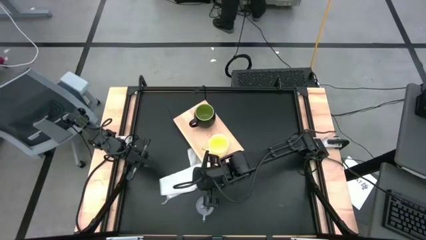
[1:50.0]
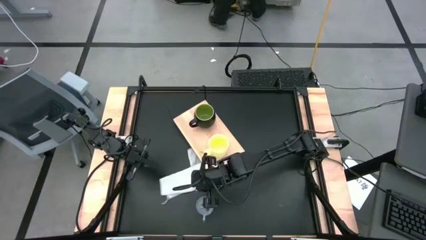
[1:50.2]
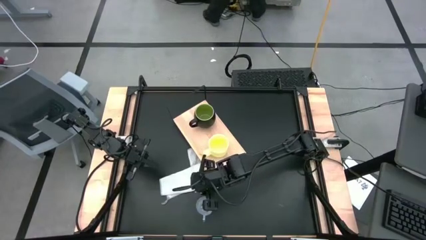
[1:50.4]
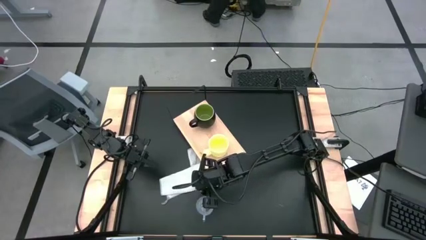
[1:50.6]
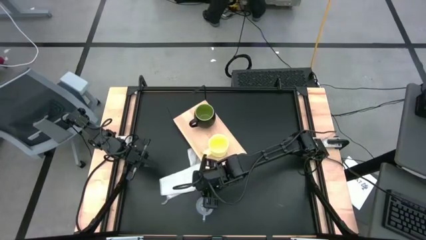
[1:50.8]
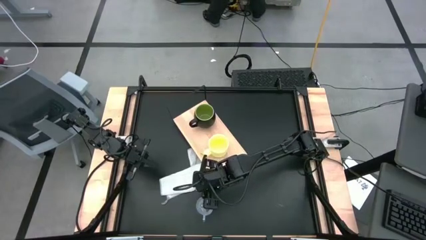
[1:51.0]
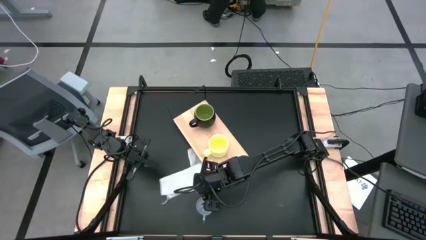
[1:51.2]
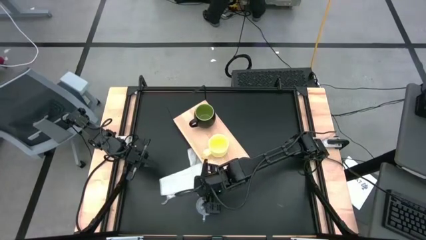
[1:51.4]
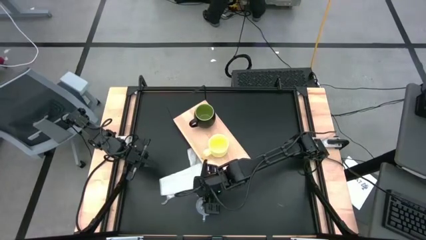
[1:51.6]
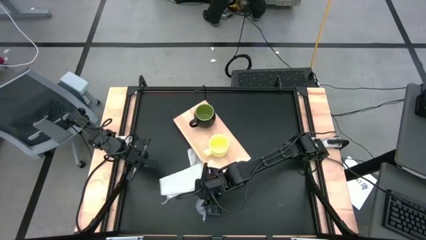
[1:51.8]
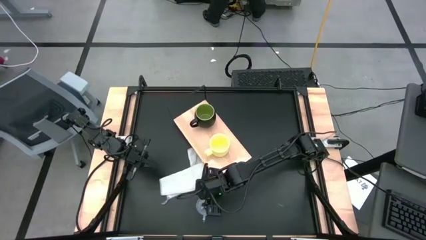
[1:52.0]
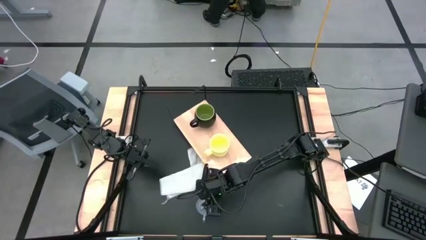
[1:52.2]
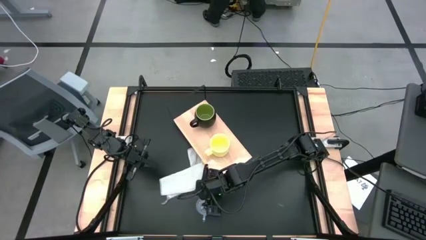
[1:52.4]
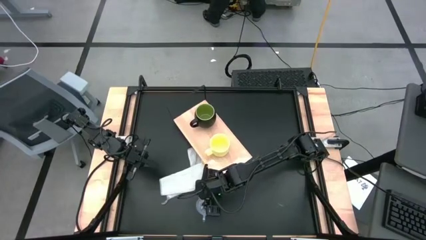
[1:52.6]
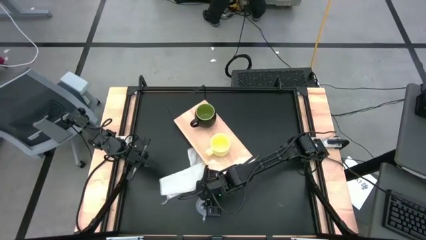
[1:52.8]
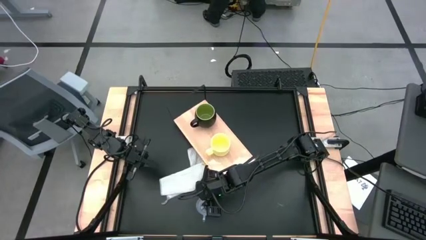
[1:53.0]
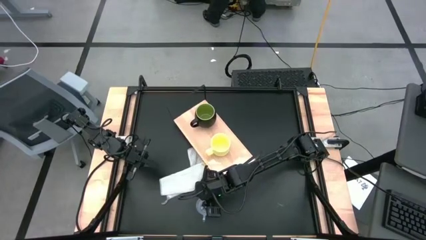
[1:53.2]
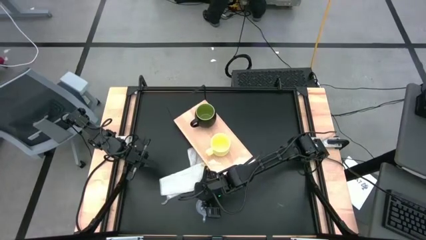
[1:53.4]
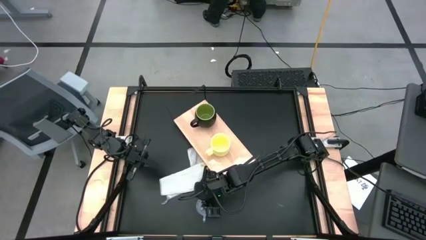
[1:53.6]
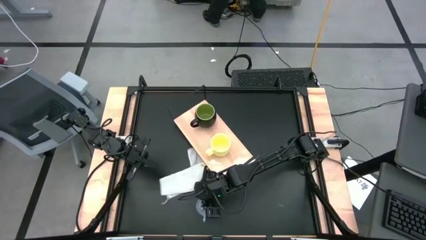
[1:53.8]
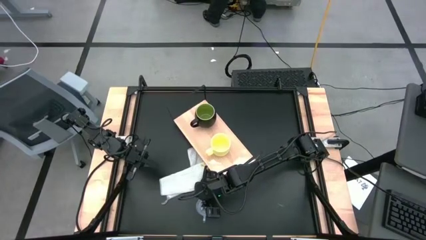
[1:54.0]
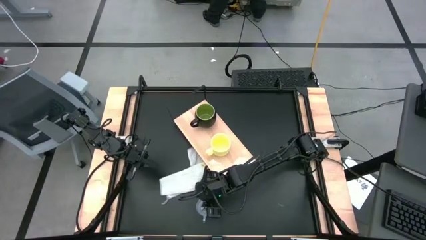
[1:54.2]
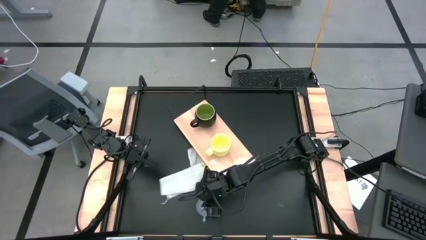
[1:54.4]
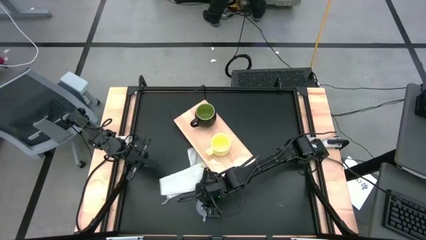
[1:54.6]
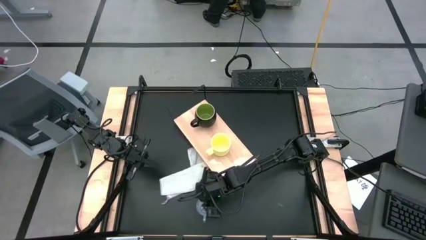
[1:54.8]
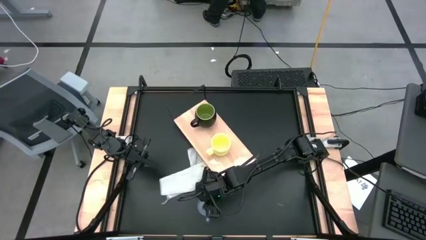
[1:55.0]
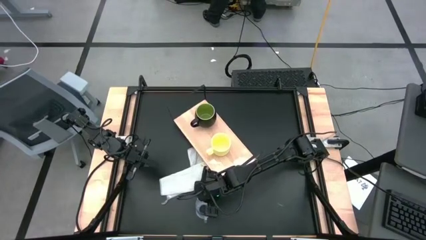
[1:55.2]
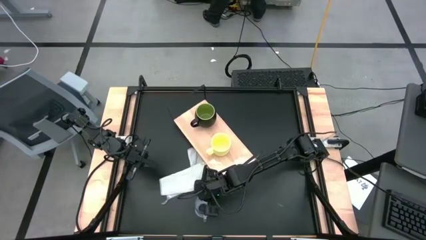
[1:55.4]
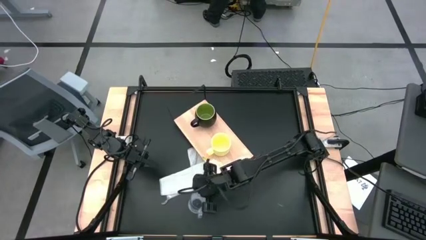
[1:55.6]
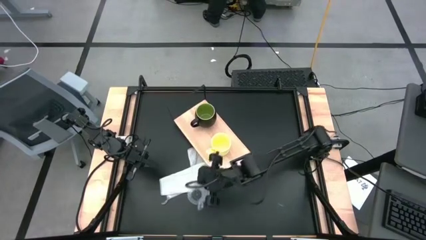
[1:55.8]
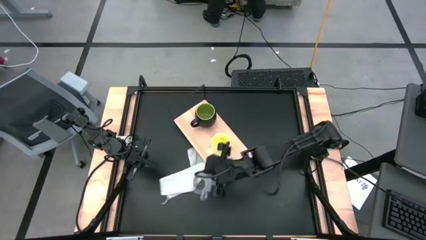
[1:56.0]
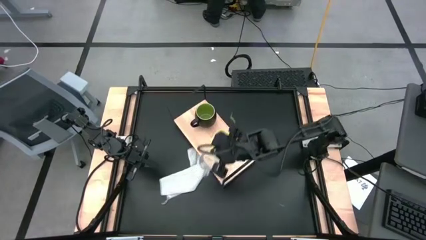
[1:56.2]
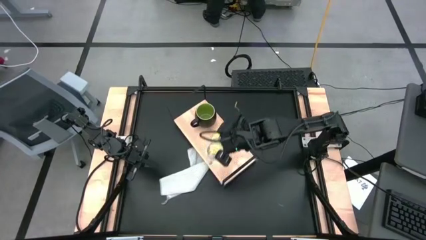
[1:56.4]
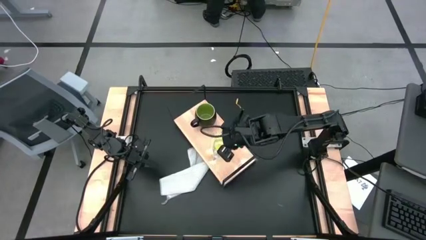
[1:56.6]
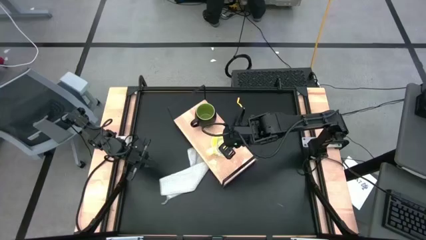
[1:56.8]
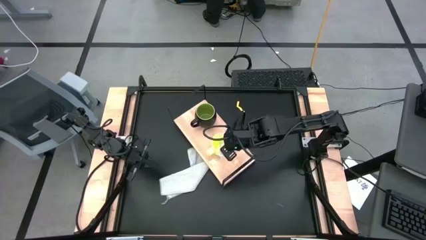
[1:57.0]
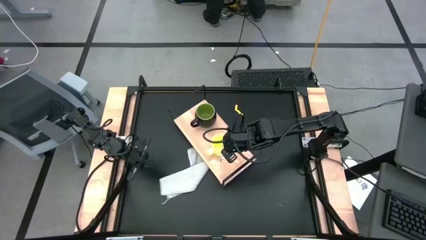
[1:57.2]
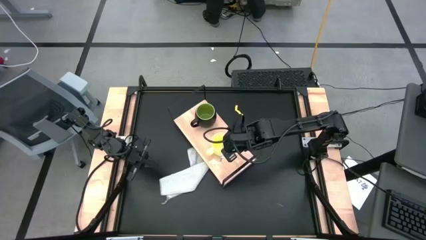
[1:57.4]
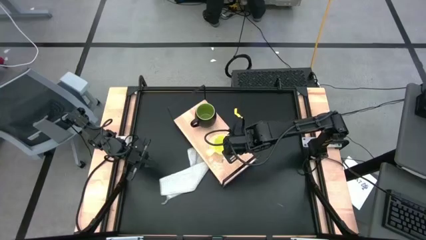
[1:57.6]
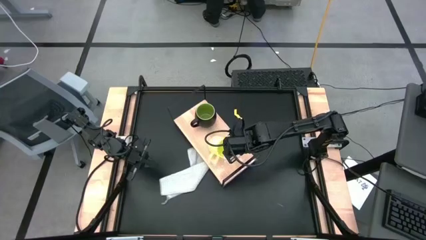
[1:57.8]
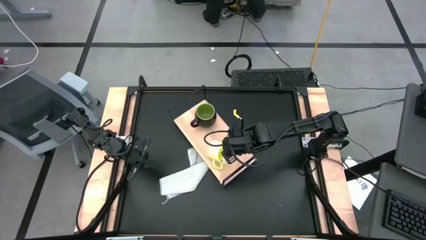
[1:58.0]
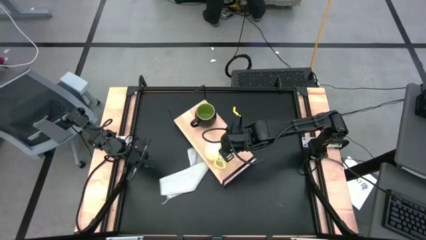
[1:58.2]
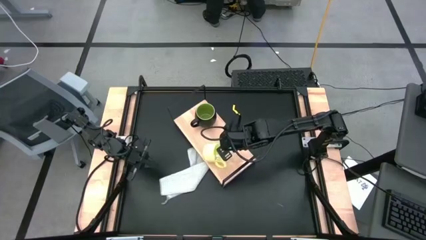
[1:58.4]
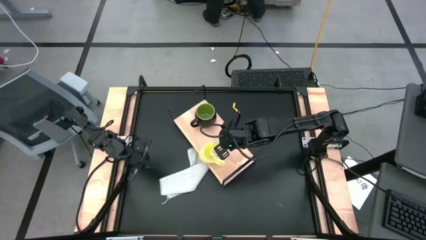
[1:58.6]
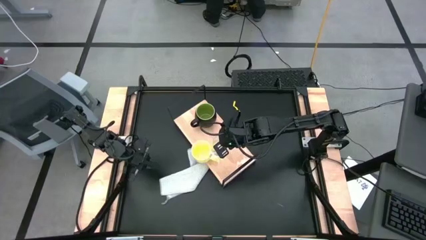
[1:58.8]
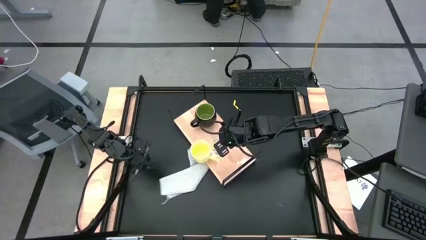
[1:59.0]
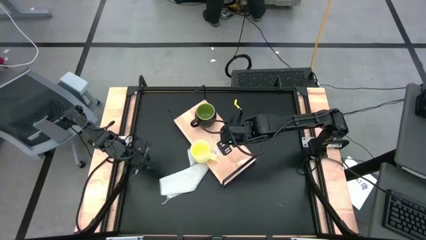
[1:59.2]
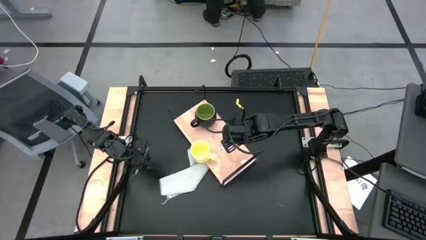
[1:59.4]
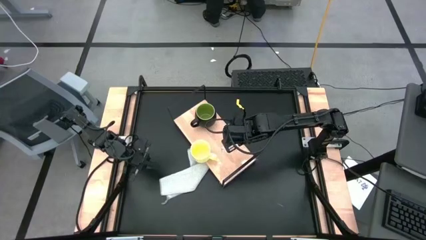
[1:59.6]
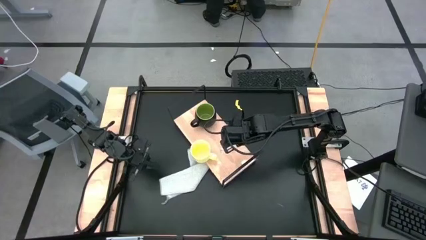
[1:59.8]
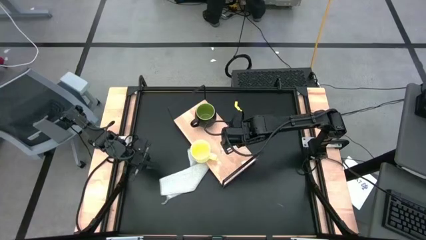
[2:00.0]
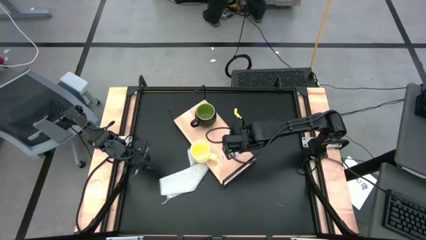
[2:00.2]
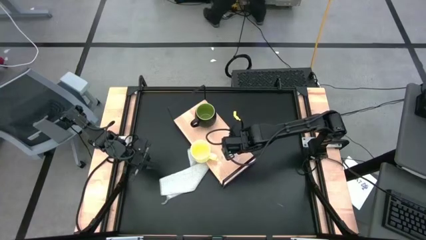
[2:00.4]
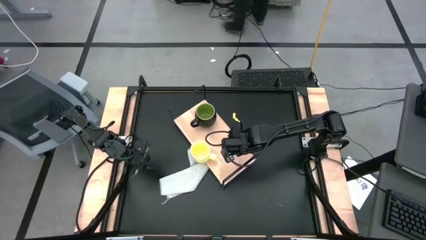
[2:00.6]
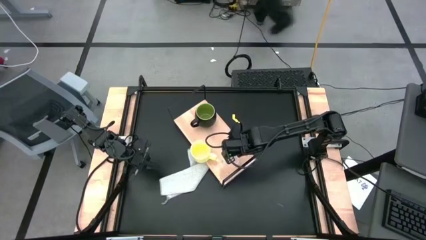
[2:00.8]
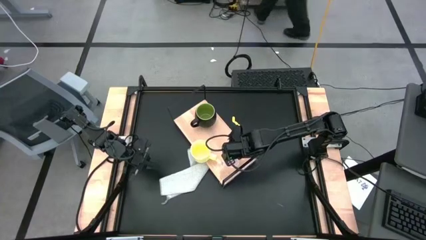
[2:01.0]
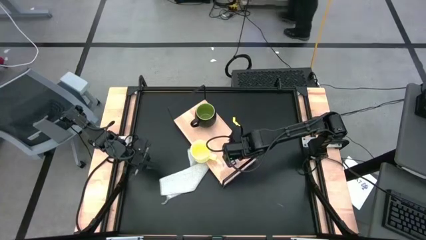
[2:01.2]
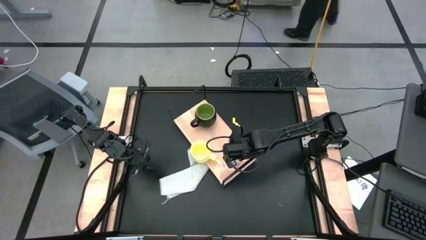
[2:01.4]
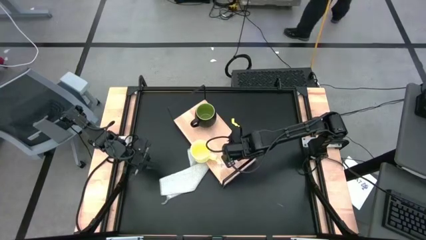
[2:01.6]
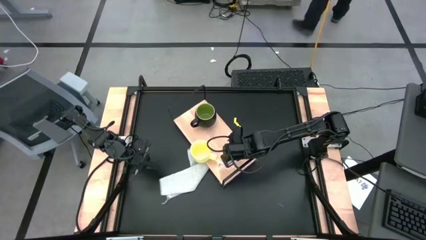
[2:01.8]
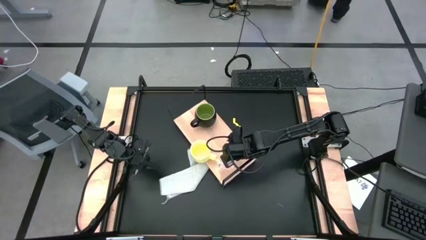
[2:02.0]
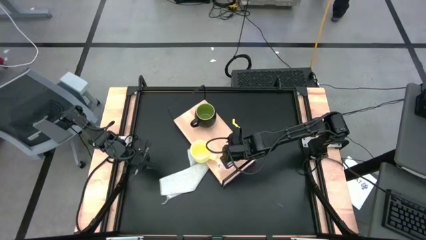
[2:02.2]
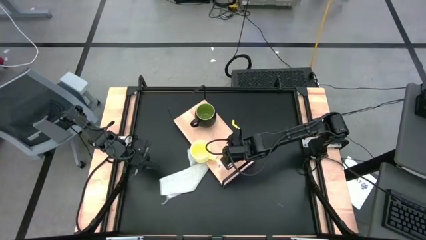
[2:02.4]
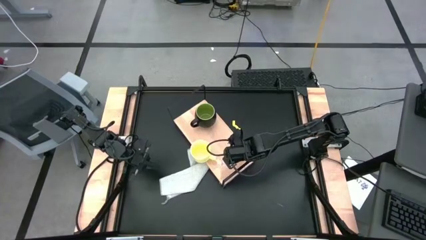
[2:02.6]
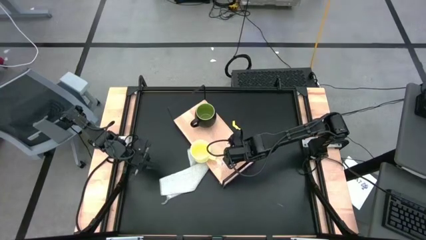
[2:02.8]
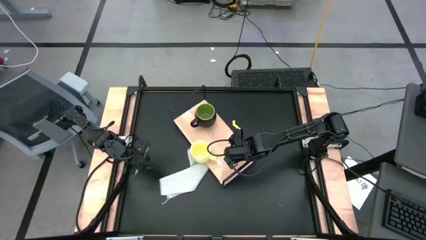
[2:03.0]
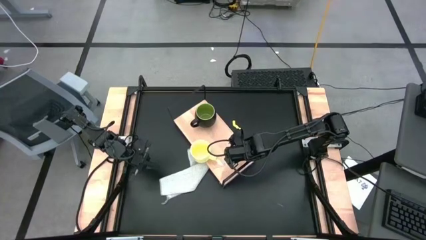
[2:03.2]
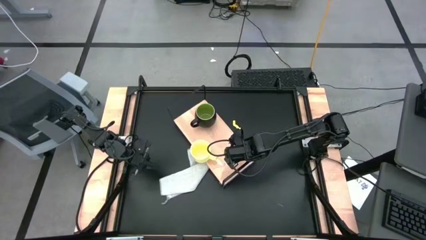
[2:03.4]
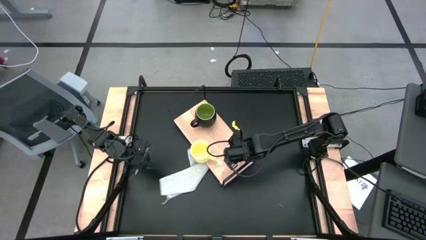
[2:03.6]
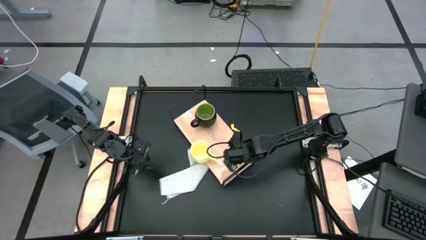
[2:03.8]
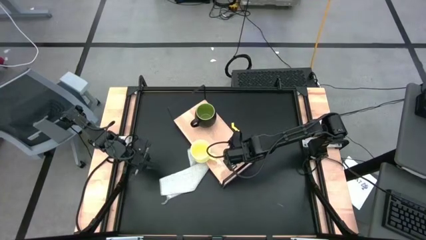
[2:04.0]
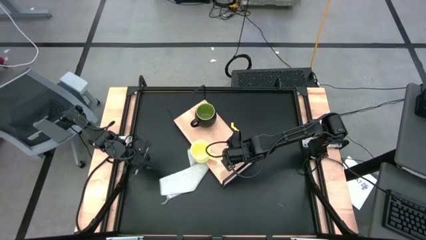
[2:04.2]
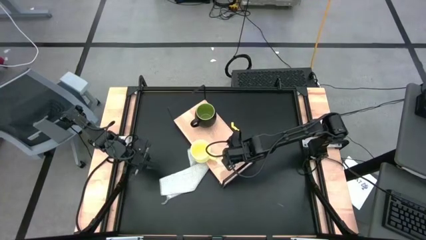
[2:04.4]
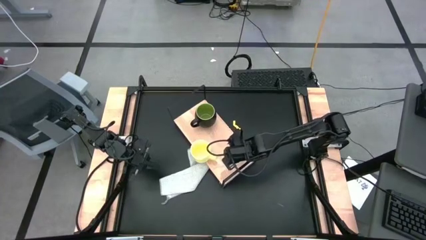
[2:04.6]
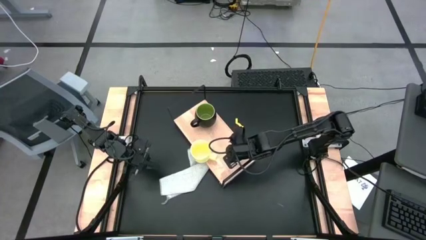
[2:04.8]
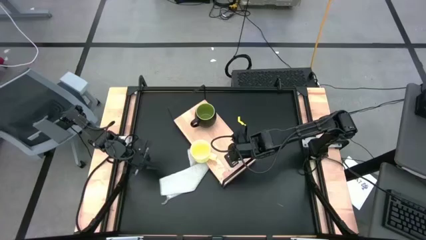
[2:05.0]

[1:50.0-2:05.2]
Task: Stack small to large cups/mugs on shelf
Put the transparent mug on the shelf

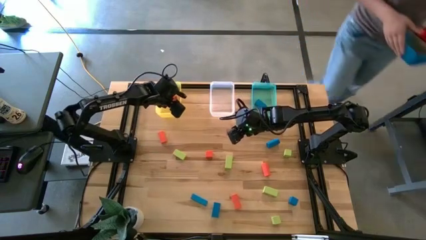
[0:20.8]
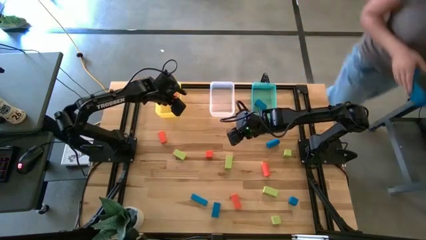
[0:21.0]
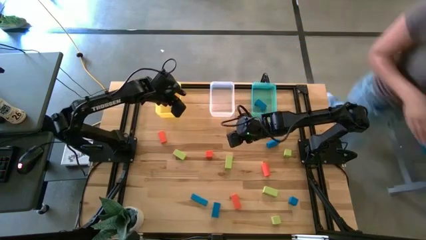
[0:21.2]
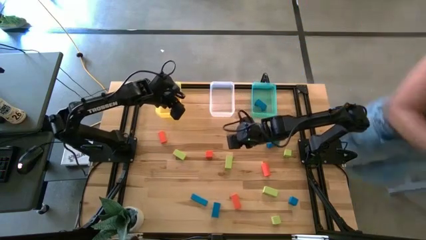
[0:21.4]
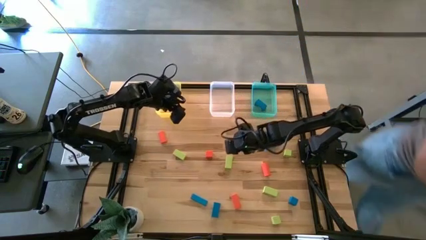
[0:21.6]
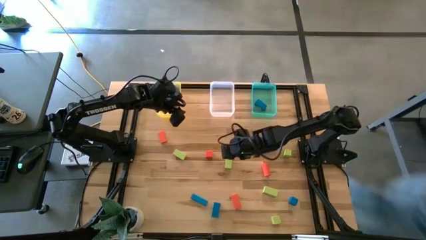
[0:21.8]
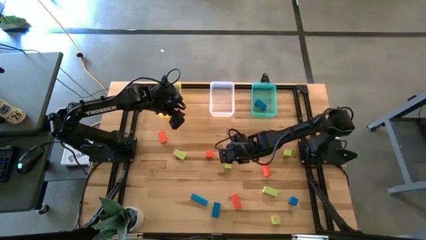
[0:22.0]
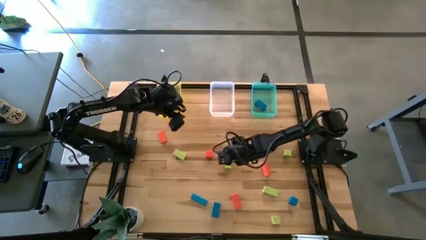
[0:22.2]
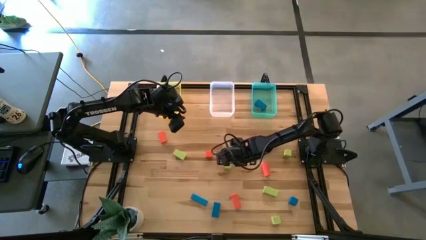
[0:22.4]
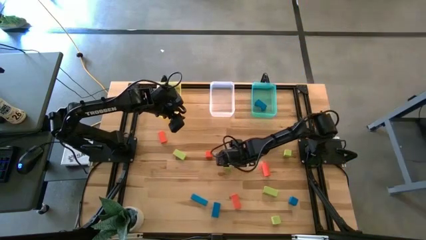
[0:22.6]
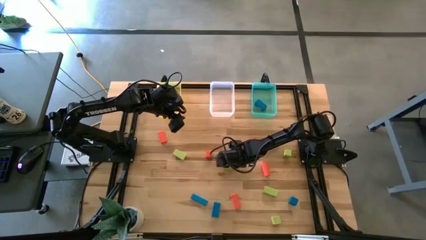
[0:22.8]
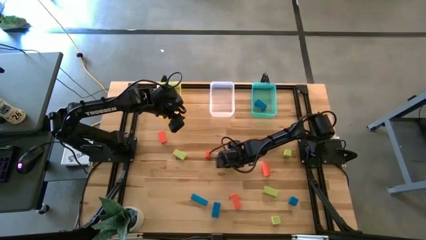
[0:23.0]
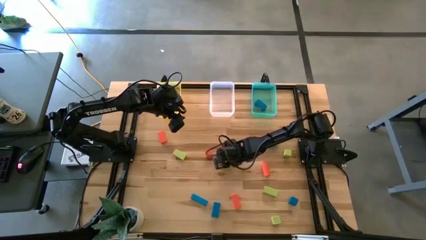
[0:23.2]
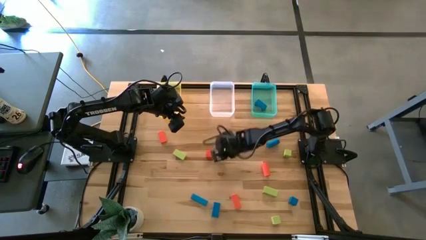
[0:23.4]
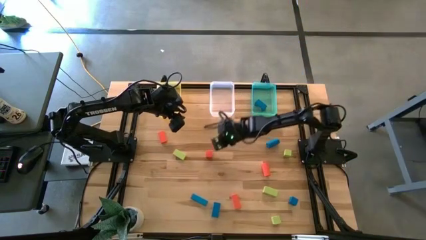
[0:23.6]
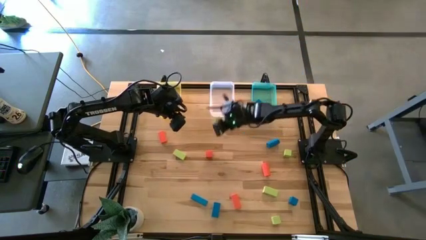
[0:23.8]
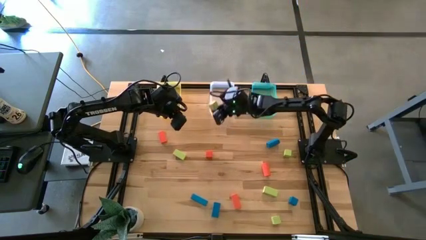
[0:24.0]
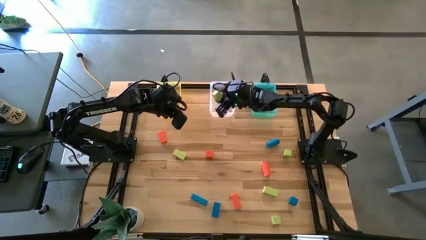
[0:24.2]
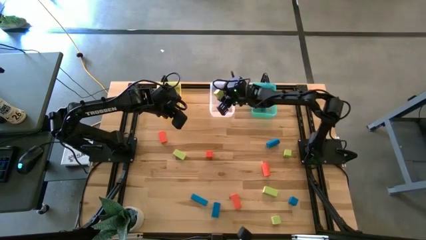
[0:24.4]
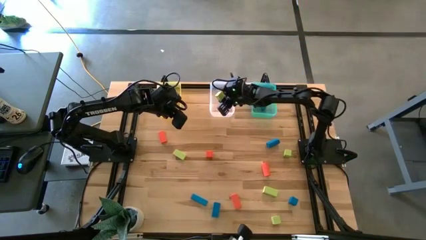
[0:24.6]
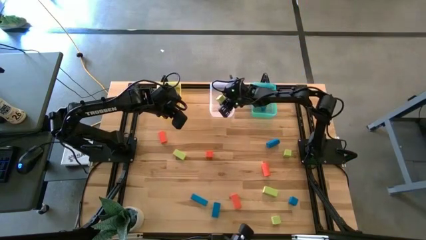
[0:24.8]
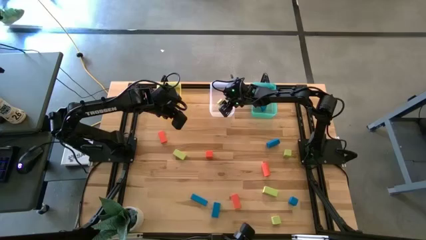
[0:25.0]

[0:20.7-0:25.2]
Task: Sort & place blocks by color
Put the green block into the transparent bin
